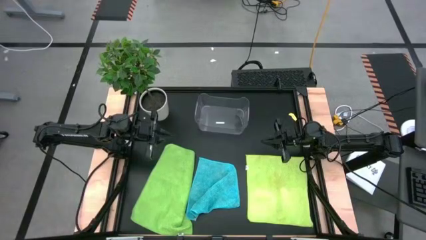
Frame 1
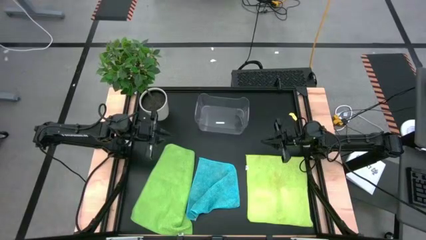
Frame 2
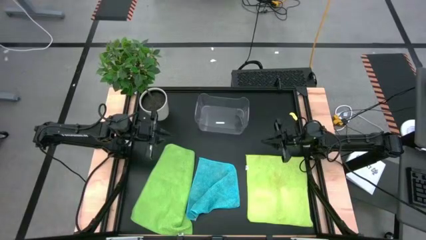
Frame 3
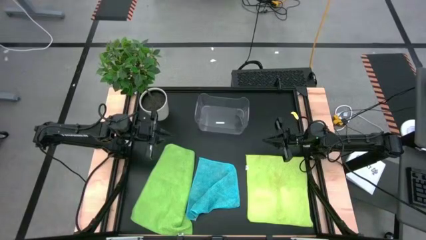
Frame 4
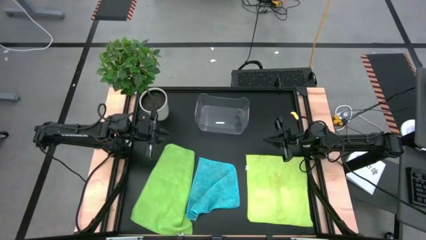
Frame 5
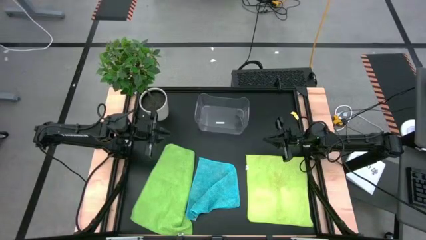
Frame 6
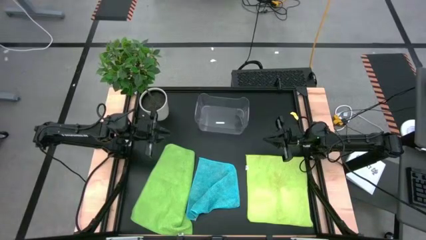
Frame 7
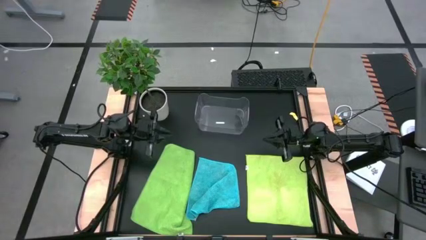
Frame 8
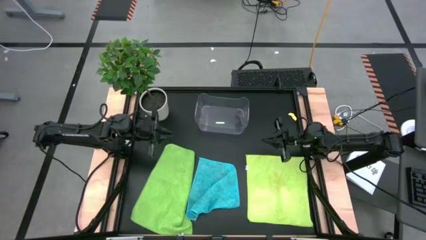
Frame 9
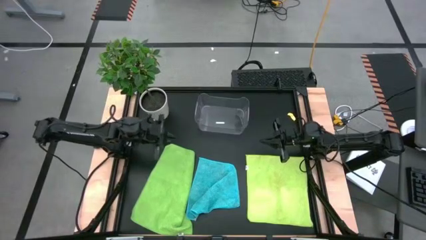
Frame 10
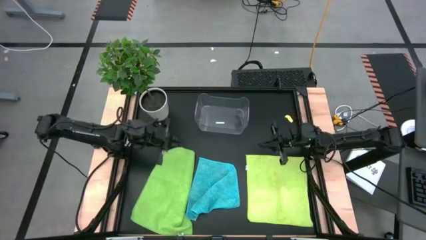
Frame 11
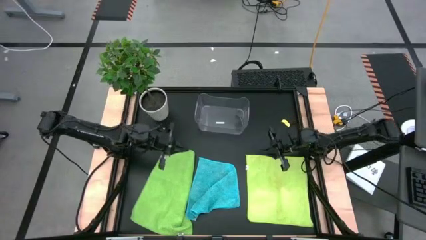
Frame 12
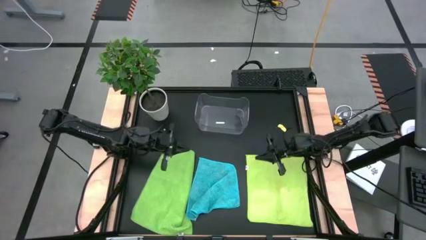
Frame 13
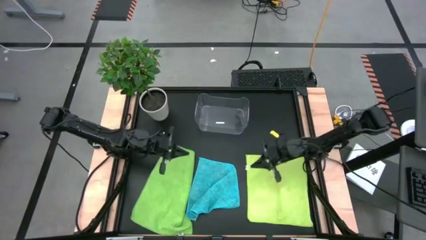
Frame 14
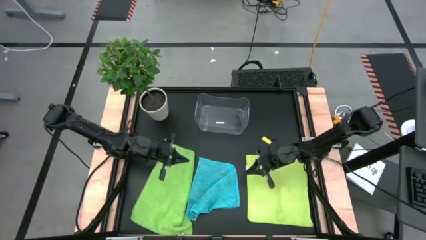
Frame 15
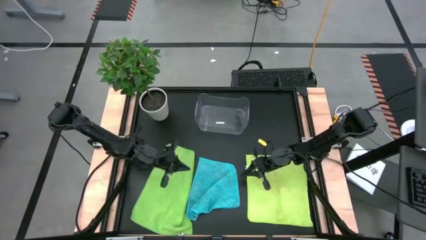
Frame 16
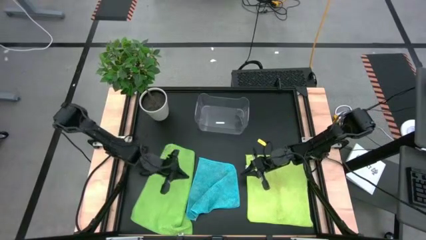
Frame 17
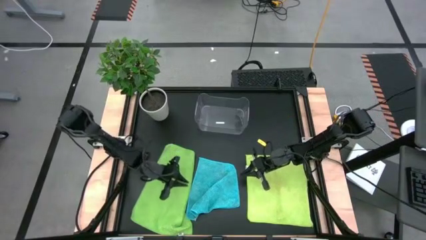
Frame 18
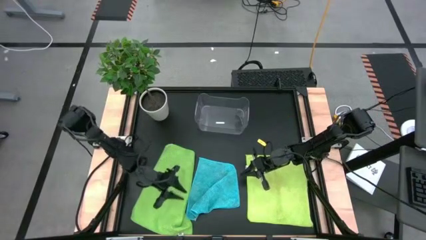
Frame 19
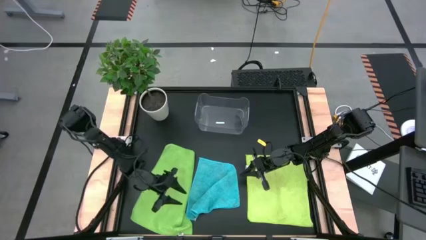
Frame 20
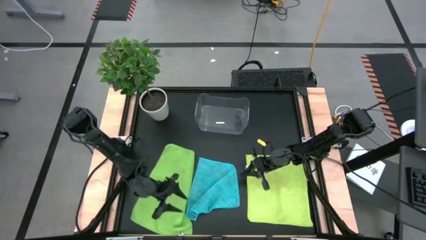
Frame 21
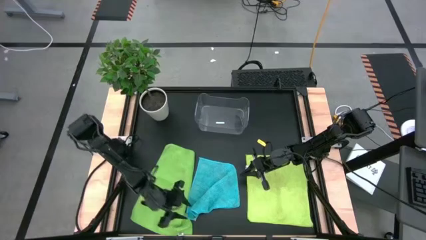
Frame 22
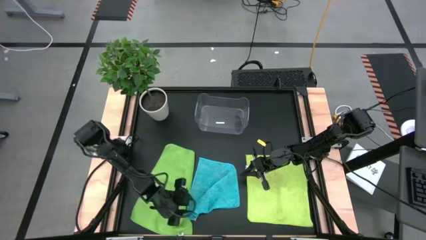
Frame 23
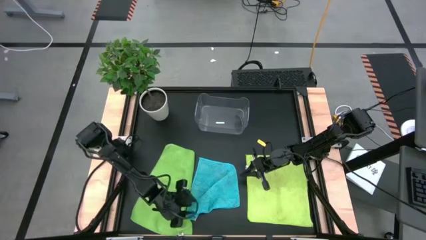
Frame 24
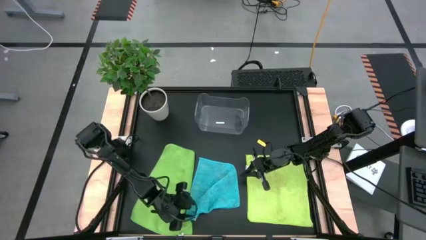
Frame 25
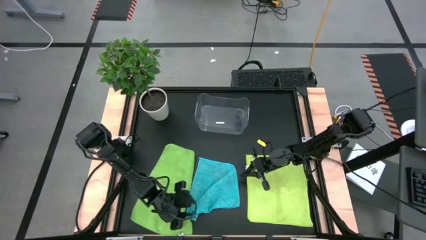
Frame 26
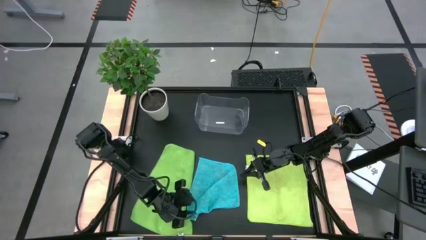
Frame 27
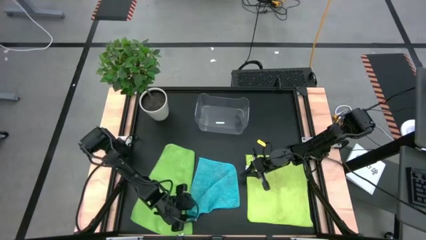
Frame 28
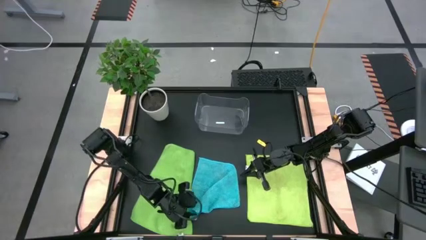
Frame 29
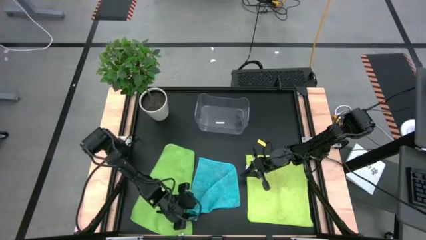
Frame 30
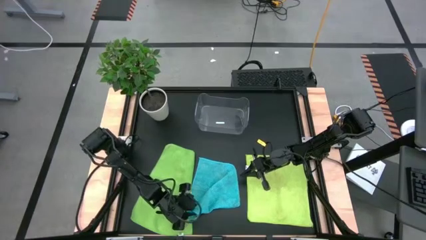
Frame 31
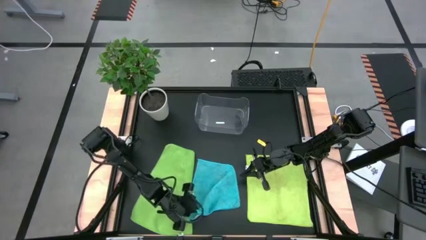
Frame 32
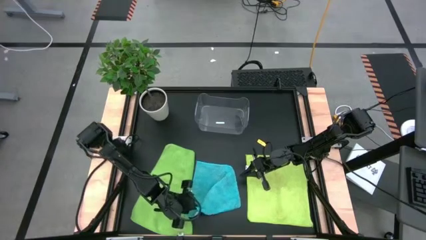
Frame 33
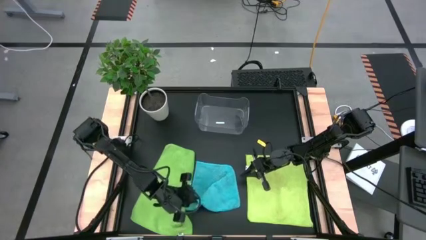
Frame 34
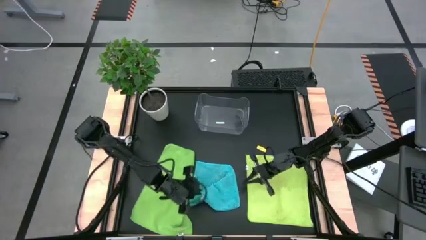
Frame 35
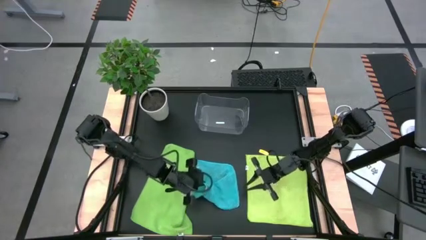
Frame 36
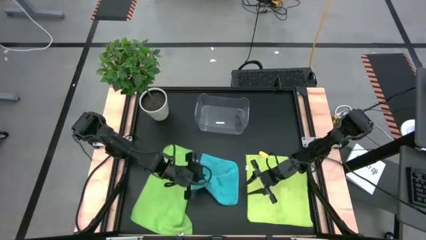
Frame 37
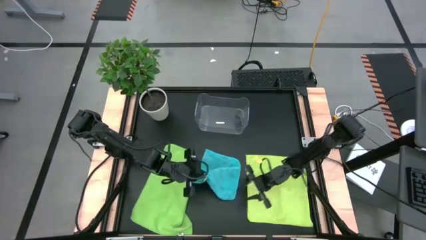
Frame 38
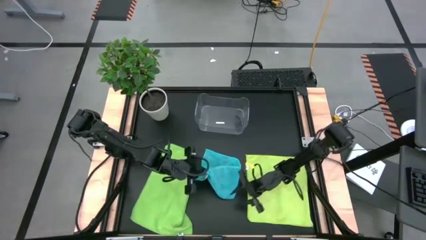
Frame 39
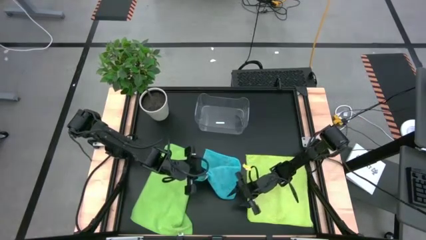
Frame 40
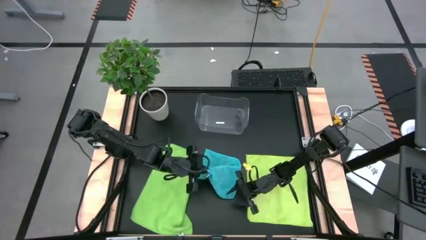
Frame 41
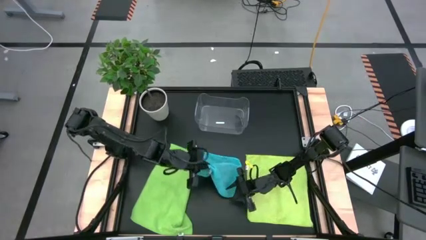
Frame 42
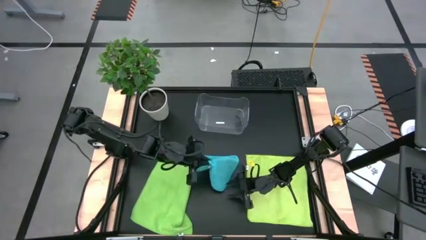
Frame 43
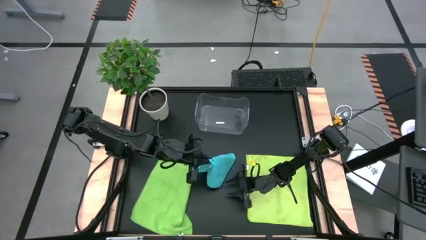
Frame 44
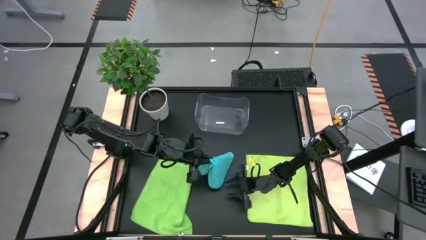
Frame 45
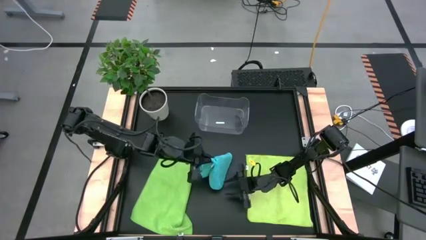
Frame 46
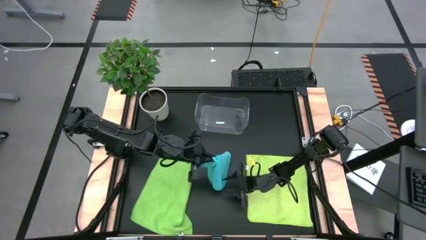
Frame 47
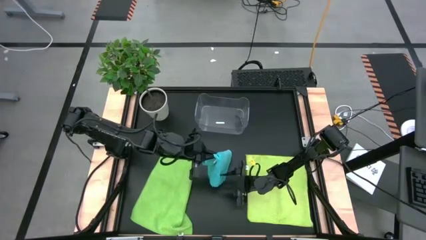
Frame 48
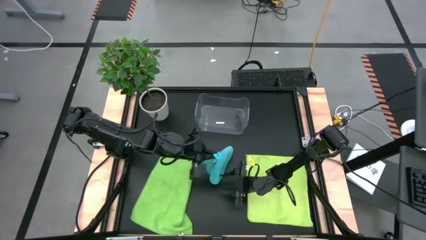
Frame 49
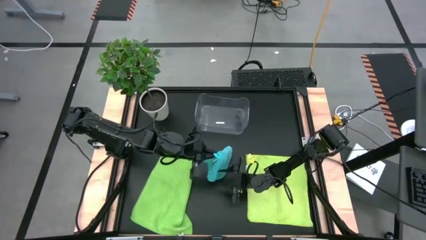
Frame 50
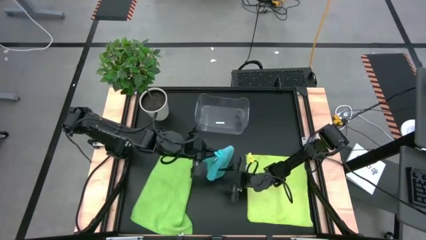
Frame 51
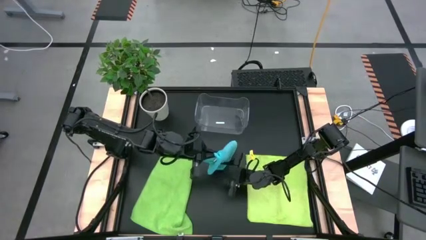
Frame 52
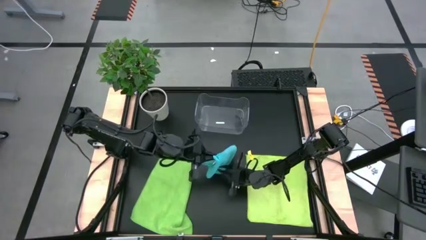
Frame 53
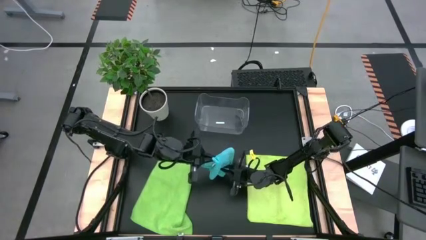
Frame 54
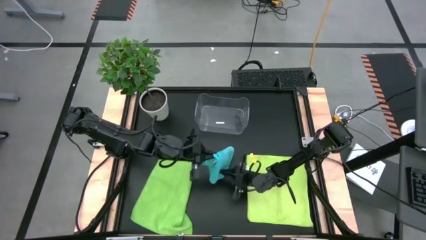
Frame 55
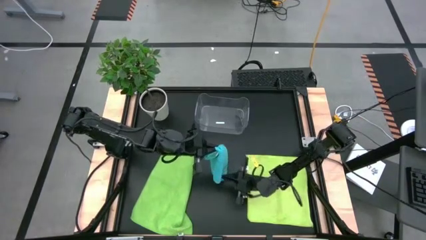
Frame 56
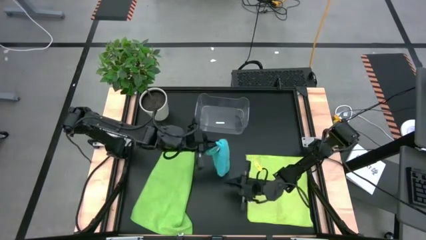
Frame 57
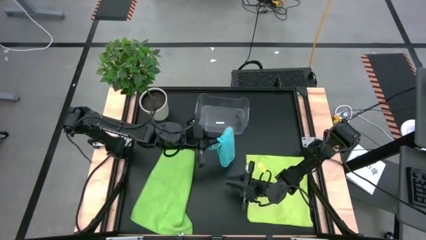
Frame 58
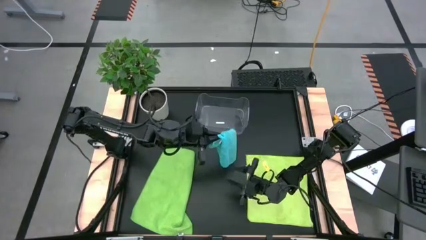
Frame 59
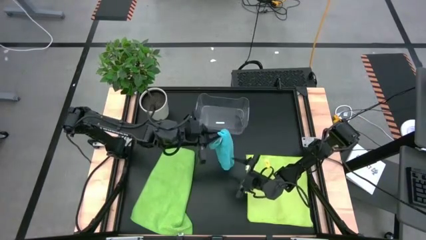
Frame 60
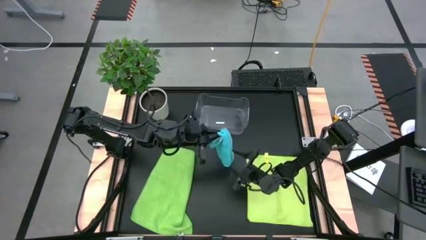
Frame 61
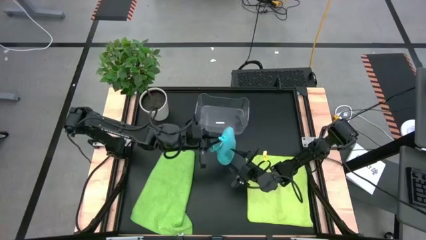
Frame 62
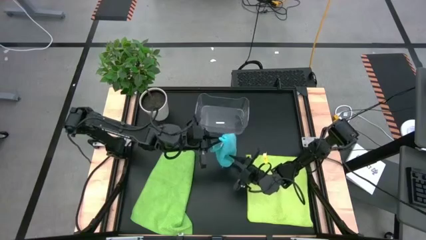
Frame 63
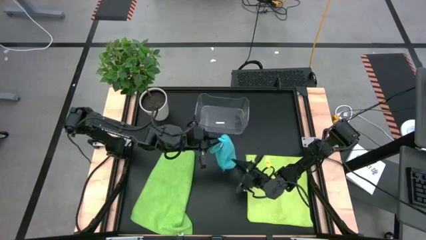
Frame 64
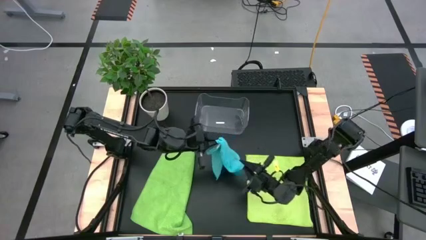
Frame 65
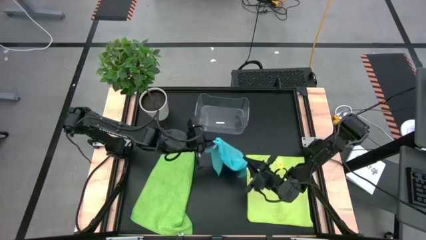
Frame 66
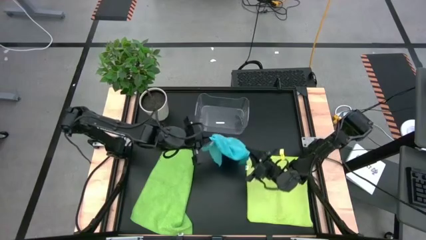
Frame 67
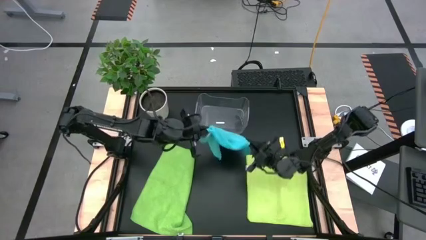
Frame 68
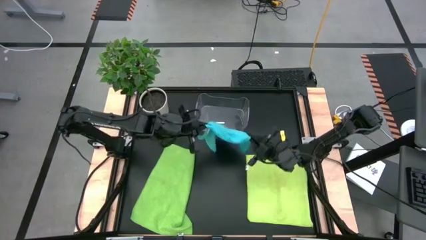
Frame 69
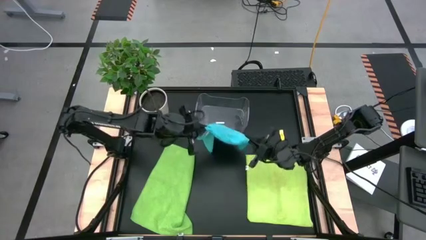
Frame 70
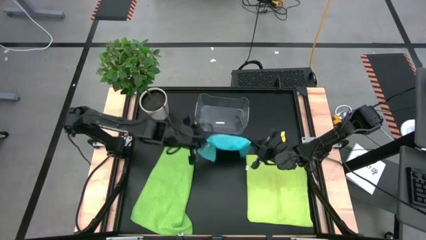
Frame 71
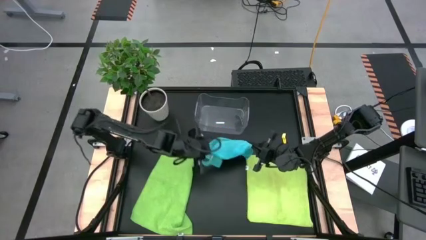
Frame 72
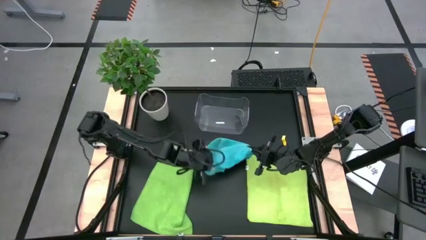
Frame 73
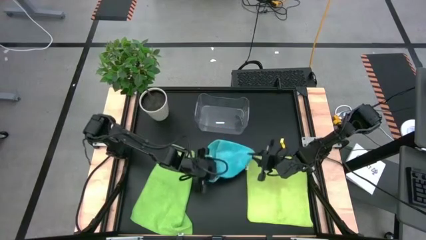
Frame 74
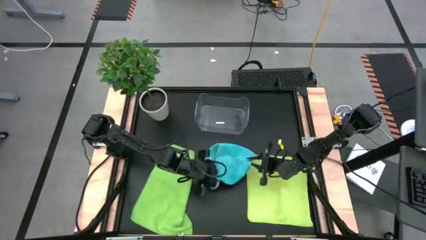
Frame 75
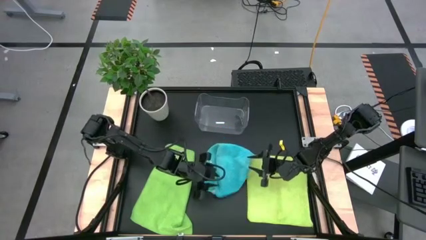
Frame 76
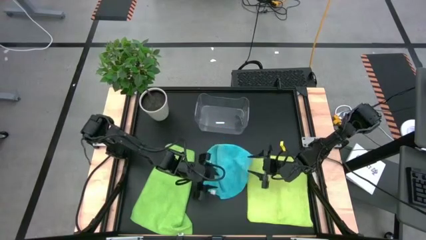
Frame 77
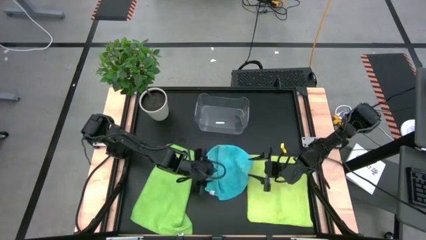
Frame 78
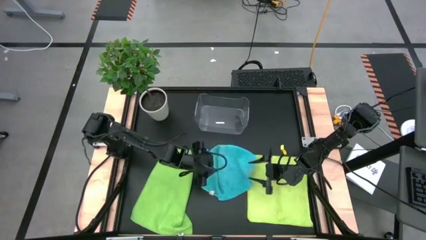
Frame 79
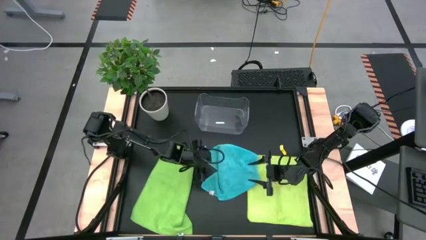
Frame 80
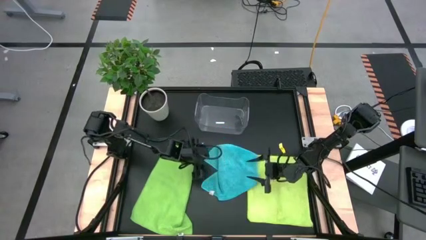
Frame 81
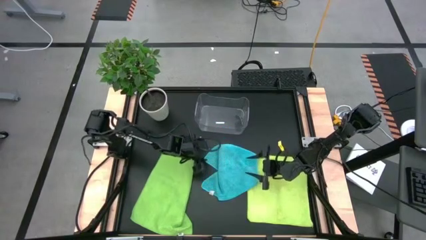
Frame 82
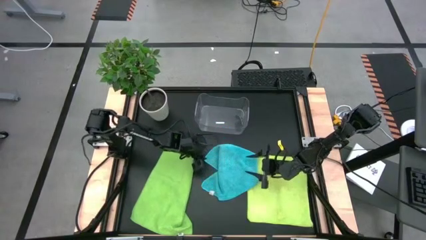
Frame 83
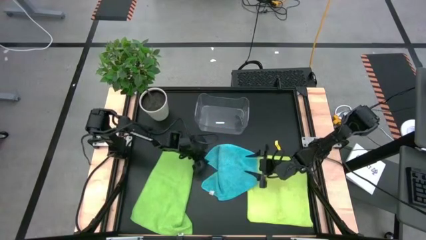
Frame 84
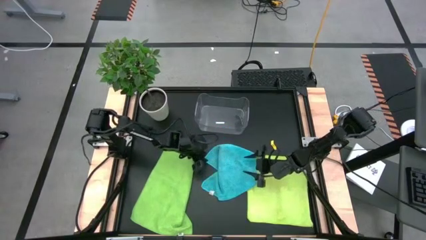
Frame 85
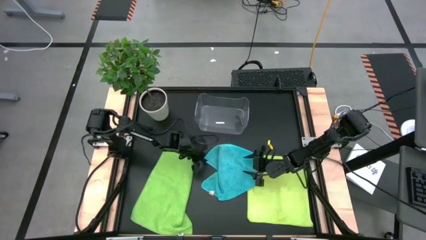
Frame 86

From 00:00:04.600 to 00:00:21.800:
Task: Fold microfiber towels
Fold the blue microfiber cloth
